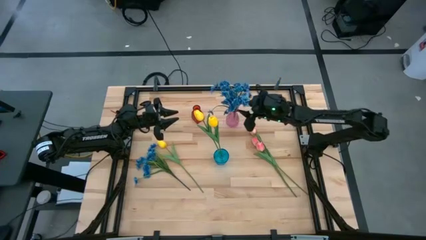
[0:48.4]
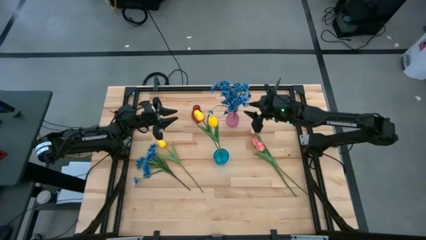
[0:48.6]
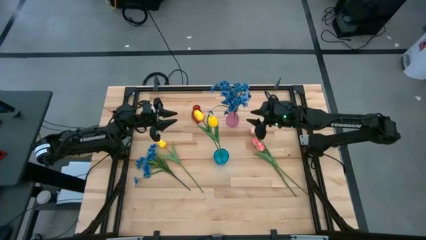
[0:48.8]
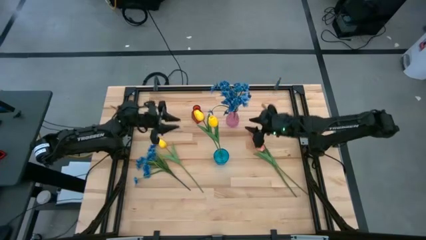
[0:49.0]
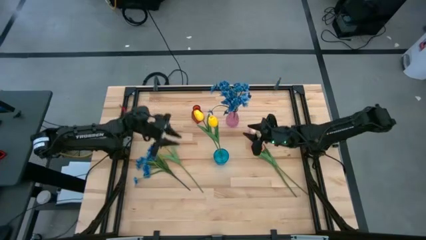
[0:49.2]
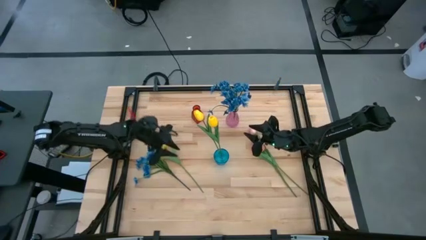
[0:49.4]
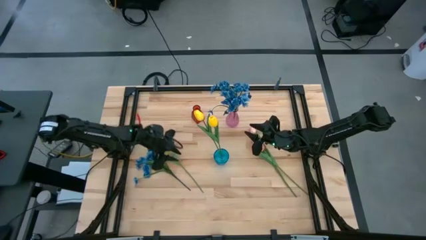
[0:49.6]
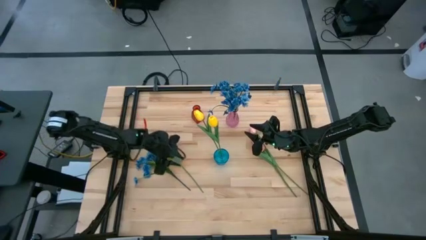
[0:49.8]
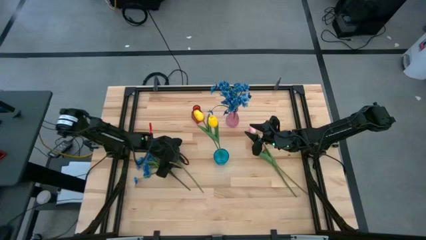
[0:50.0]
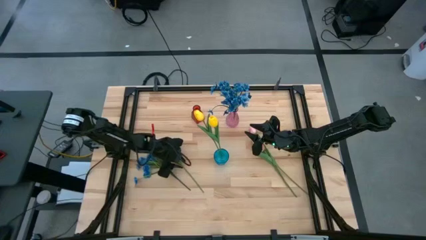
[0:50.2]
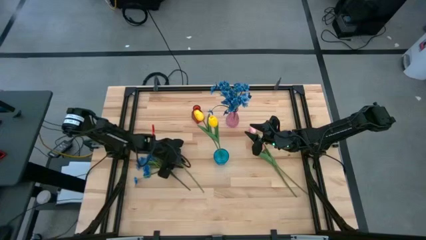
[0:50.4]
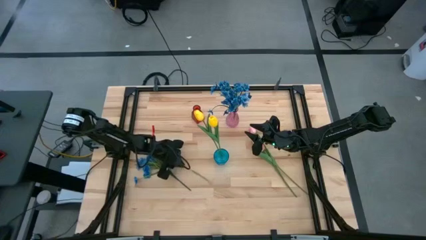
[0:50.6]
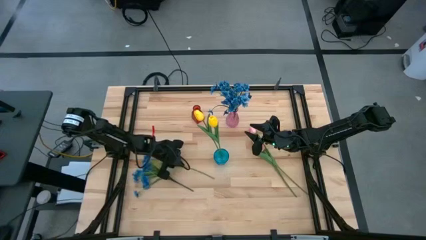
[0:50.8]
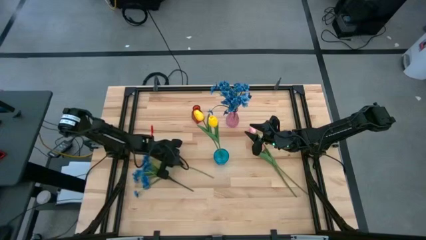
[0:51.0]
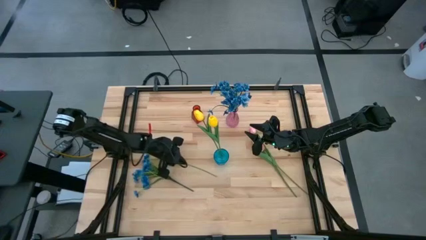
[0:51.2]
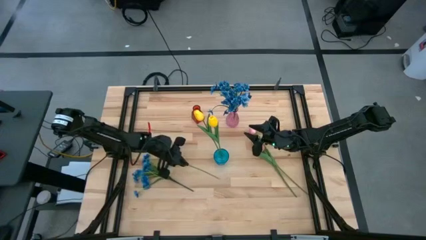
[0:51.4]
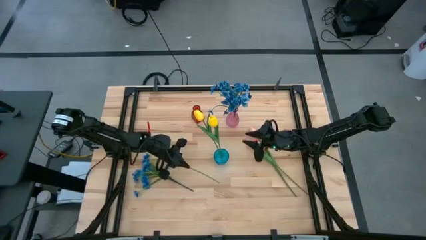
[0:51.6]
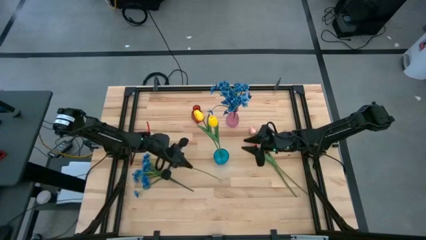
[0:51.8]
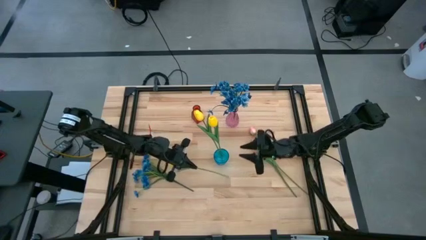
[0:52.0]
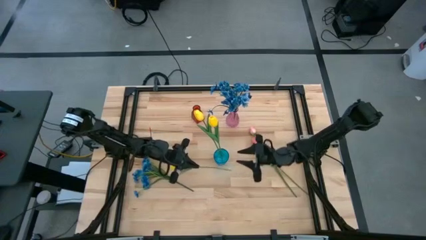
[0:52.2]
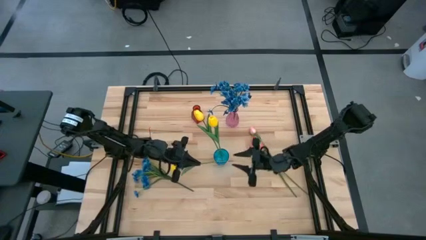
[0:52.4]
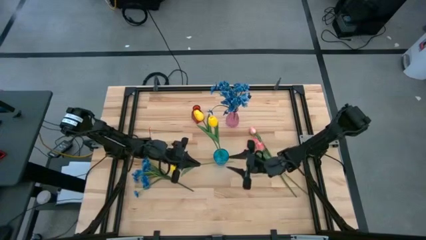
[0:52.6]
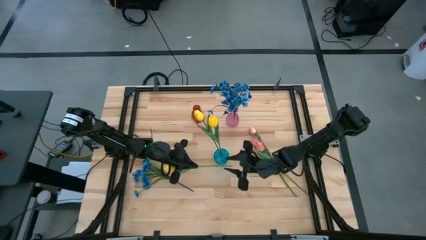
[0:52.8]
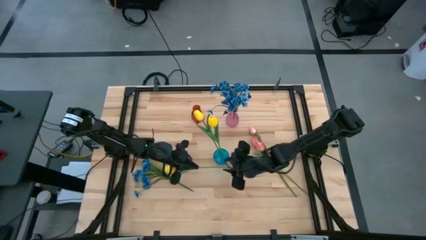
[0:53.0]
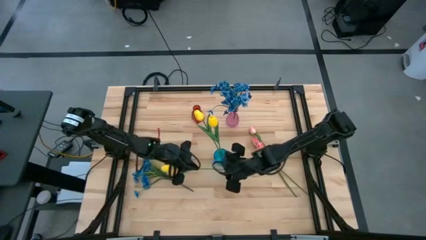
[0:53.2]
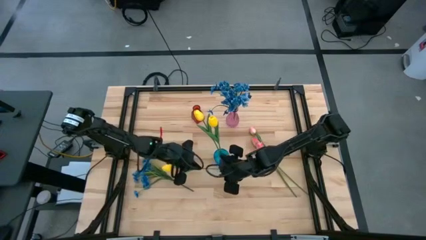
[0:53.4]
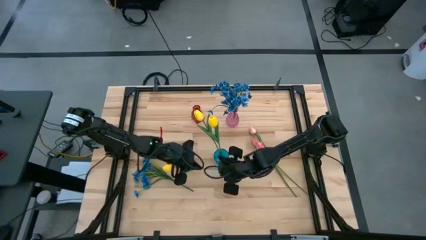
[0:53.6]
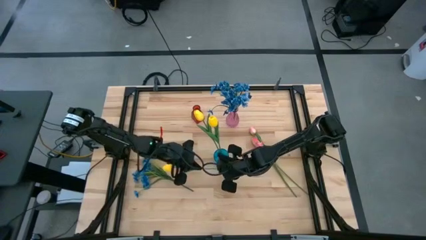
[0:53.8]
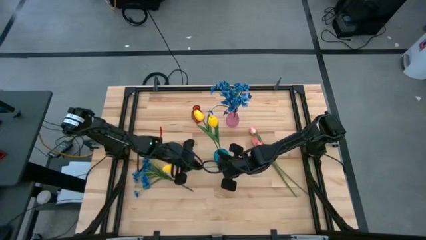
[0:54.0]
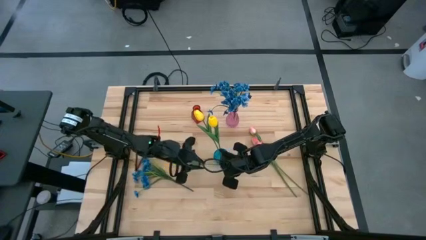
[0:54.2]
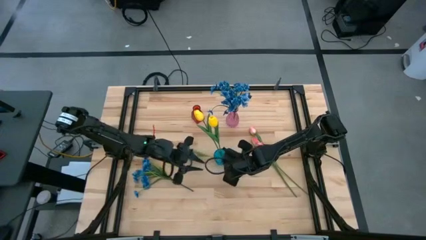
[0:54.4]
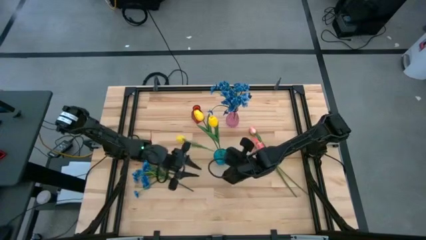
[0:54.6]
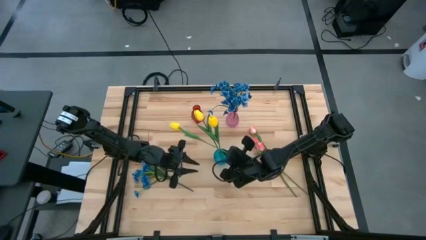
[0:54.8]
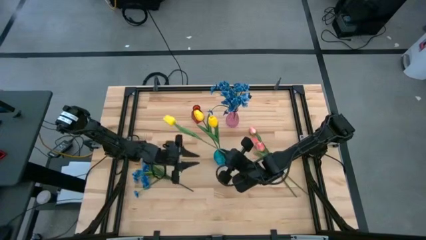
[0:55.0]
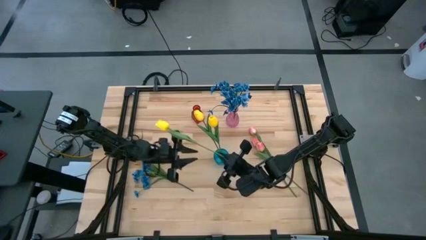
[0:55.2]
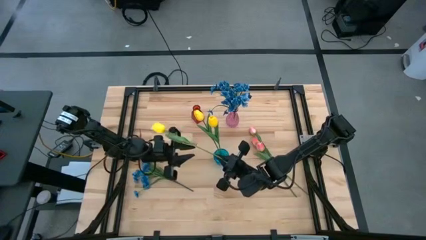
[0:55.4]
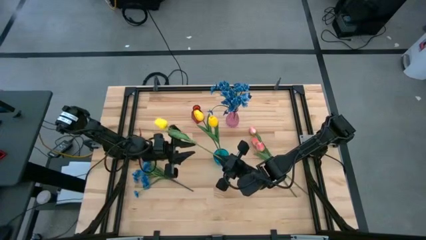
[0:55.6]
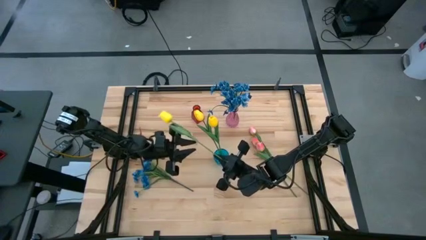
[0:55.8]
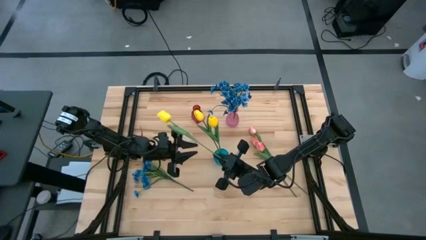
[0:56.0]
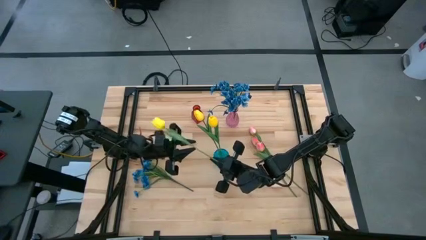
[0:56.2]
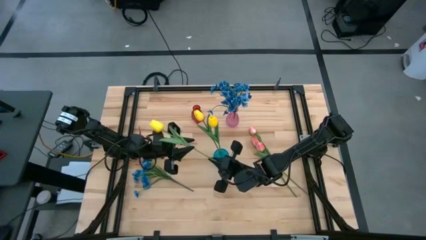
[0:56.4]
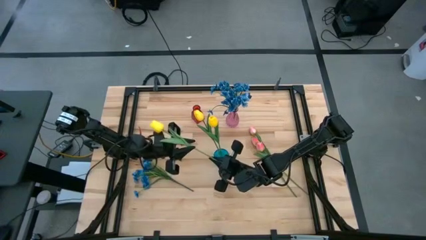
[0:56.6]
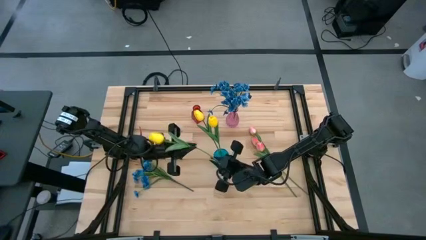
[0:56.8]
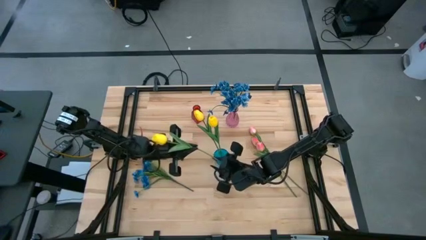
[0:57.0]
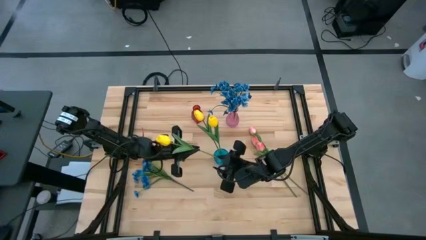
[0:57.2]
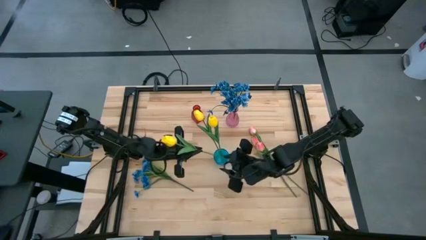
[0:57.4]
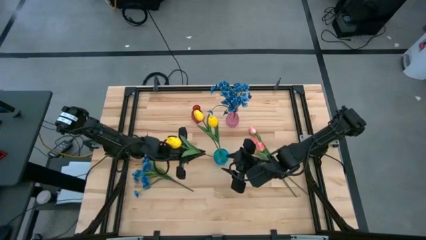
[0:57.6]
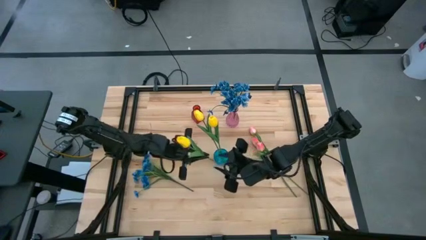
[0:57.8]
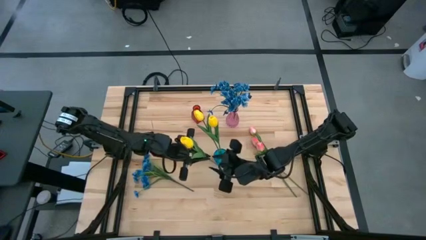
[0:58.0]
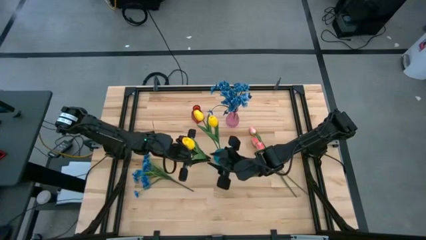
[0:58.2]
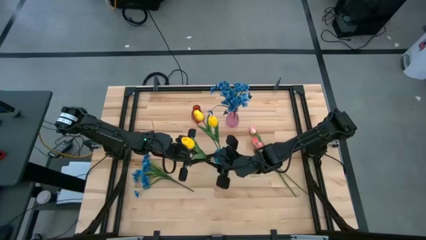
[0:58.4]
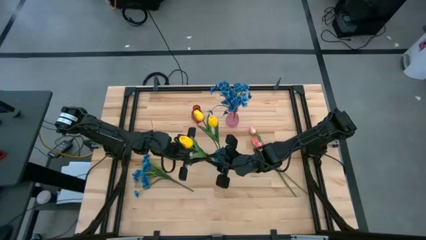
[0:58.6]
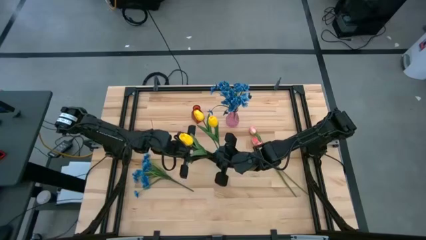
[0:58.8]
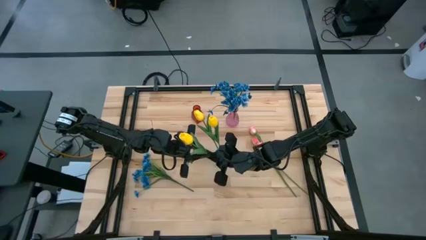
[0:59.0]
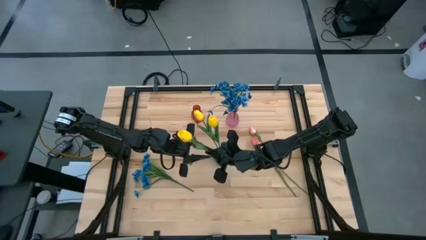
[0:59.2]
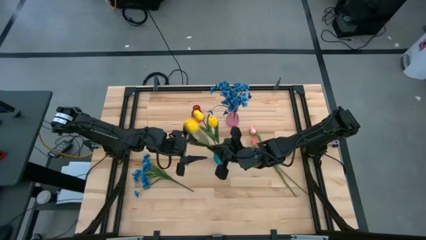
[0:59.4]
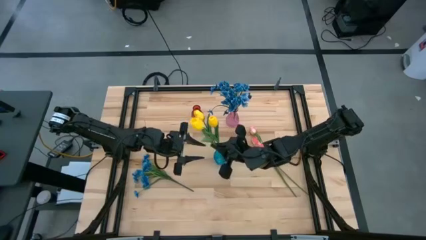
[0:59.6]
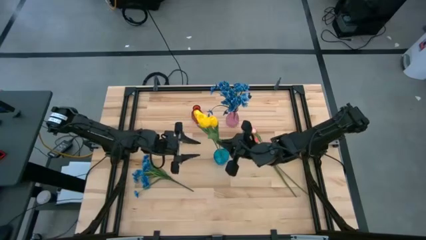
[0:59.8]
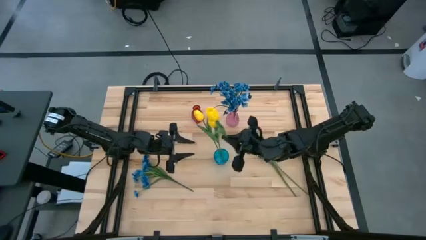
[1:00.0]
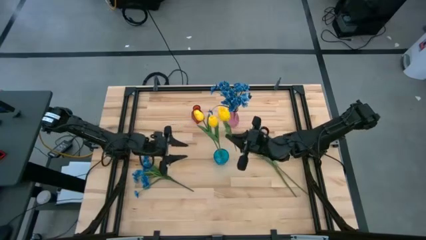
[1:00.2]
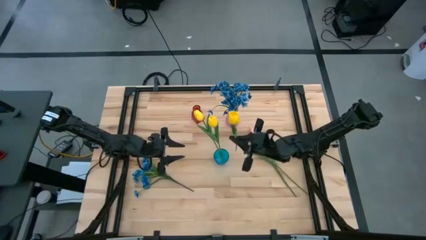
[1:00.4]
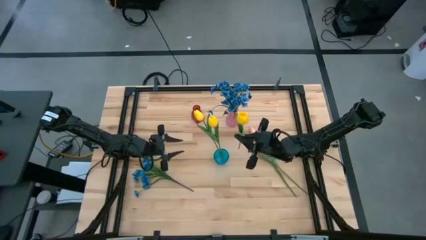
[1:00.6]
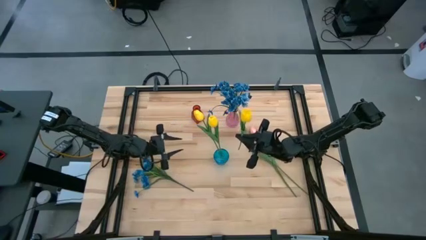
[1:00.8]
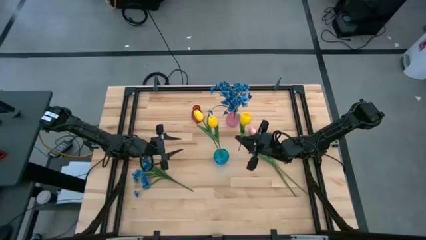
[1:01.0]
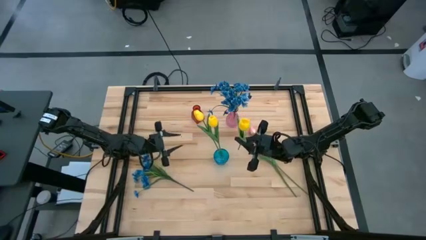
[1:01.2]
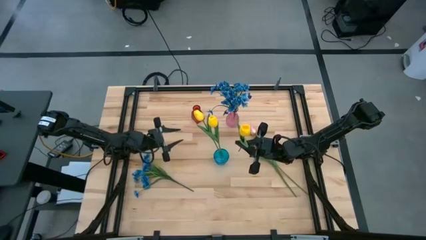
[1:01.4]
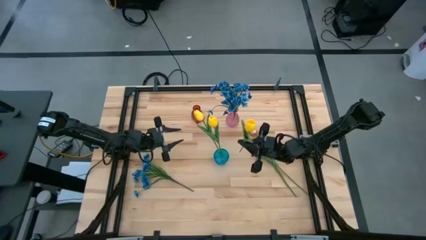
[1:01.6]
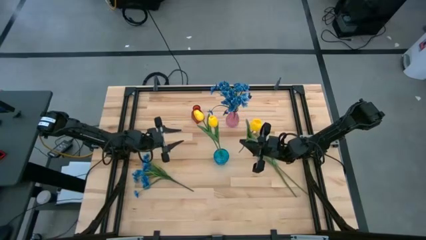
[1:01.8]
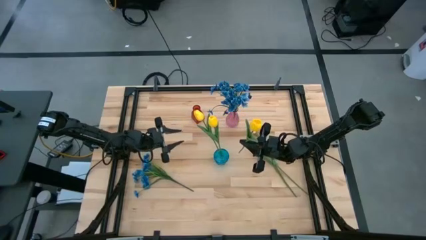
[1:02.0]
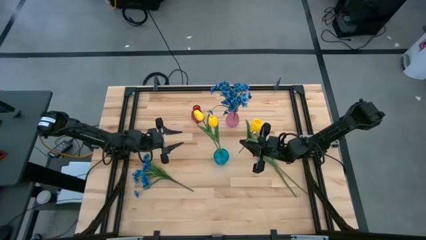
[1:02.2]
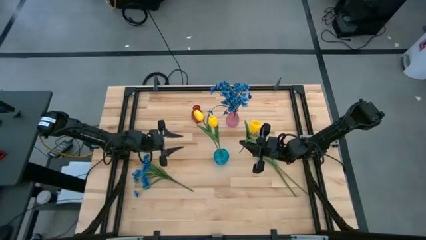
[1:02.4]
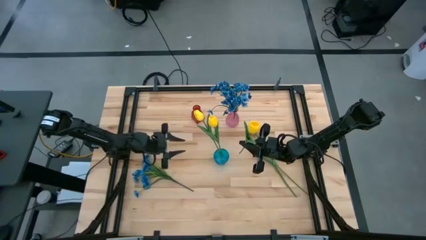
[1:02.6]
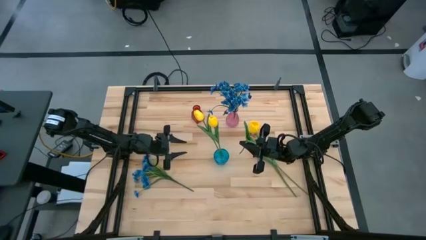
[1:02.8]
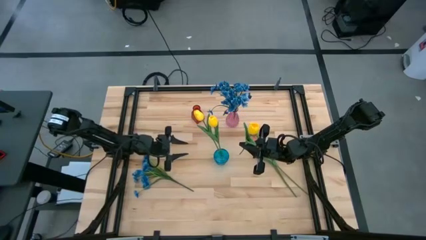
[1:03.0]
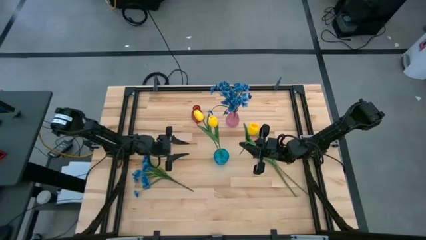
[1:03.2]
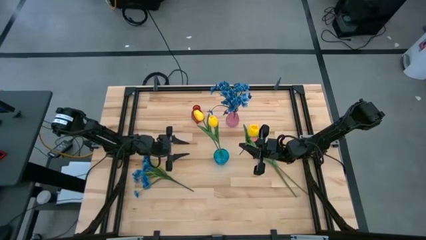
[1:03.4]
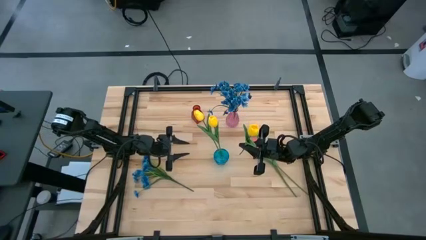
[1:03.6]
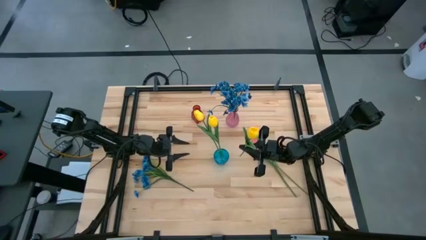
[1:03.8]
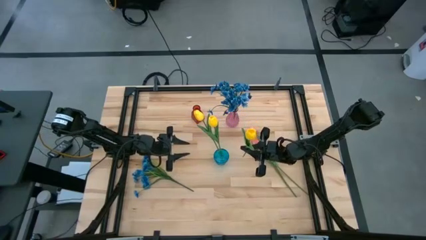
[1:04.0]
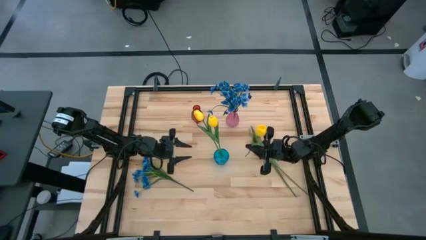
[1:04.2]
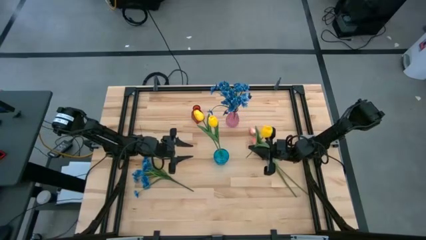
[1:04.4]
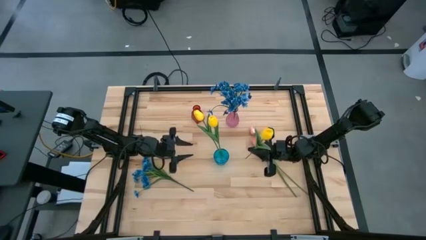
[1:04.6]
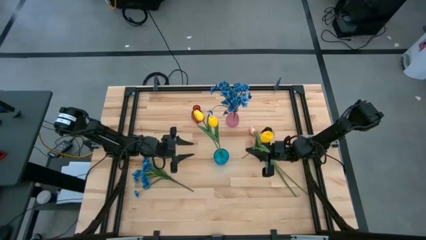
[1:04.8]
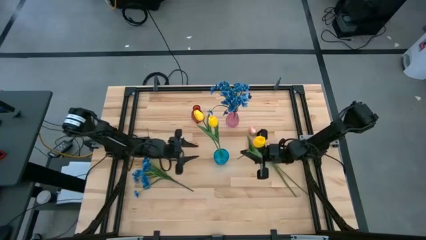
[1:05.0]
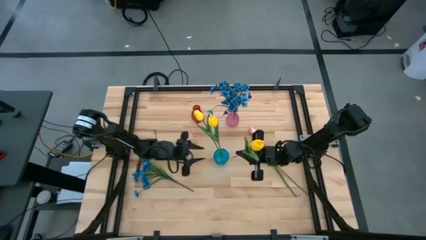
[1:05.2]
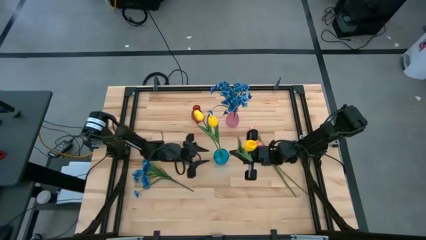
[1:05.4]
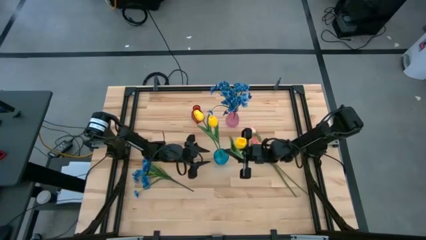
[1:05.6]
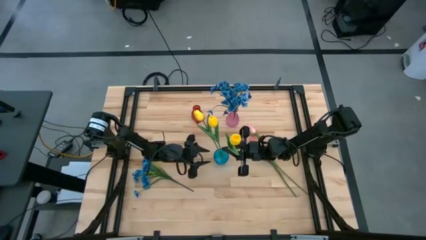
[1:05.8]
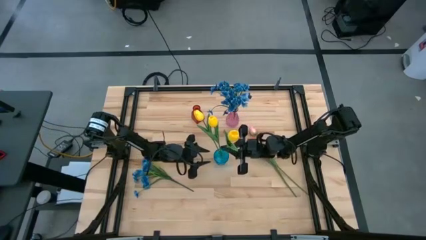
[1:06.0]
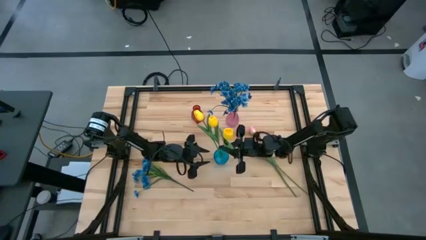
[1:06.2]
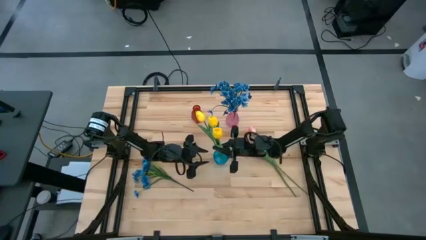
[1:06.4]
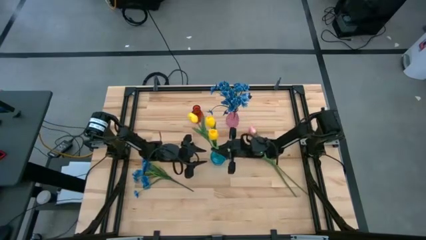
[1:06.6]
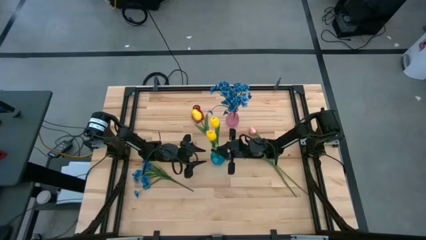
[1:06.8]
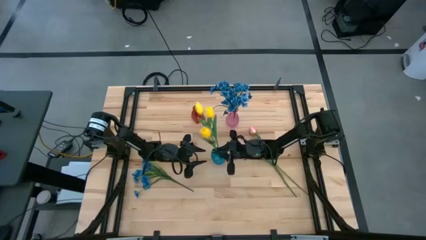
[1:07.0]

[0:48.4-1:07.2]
Task: Sort flowers into vase by color
Put the yellow flower into the blue vase
